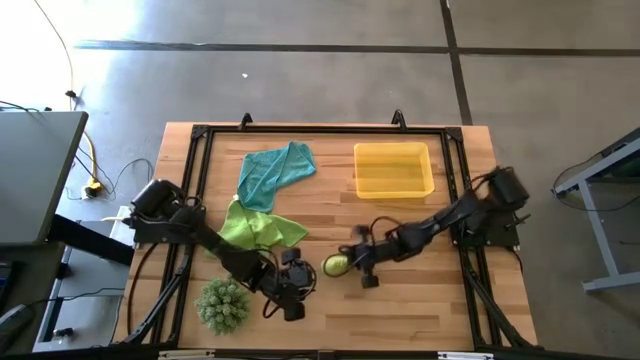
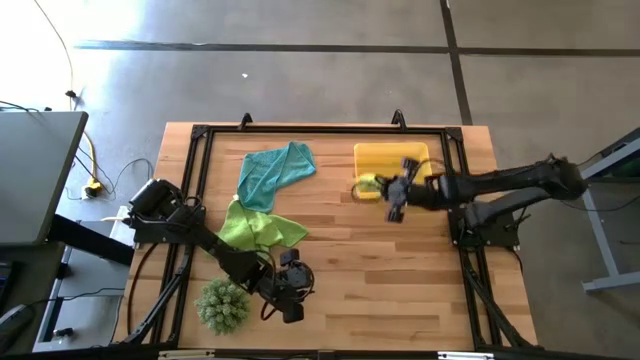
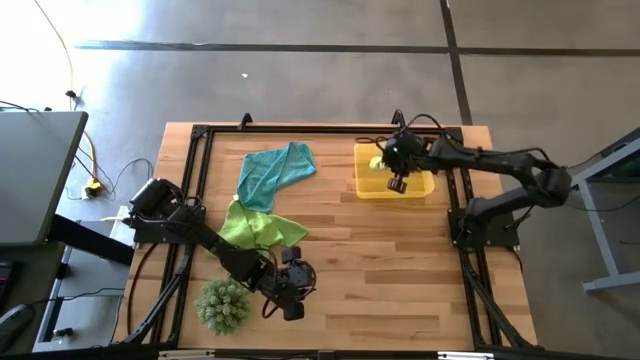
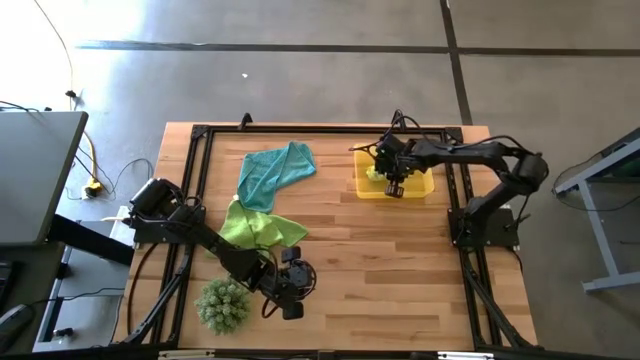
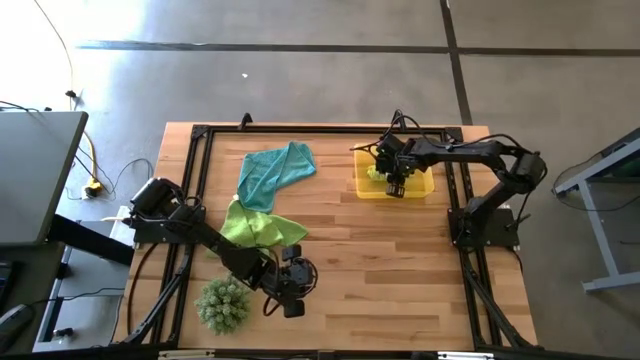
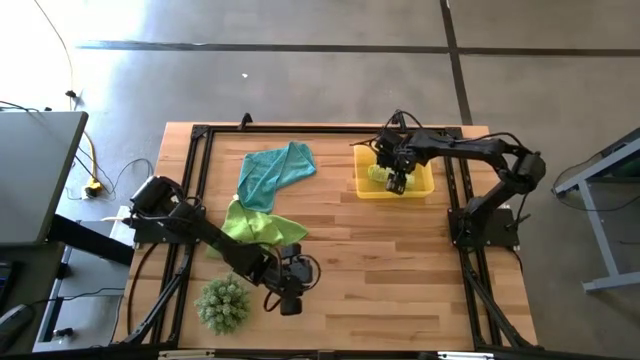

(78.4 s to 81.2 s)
Task: Roll microfiber towels into tight, uniform cylinder then place into a basket
Put the light green towel into the bin

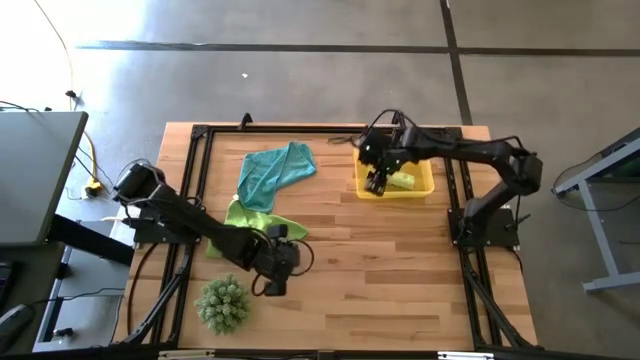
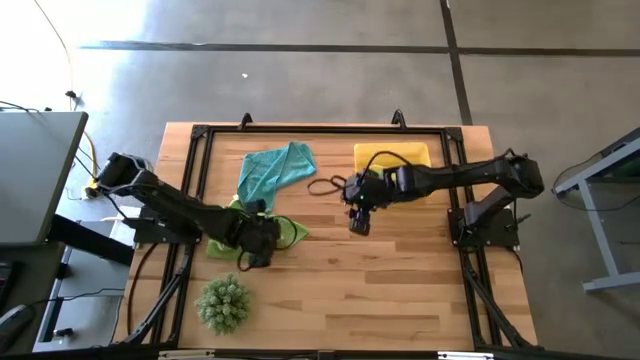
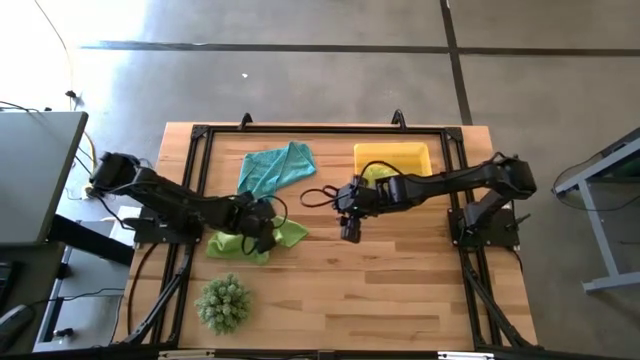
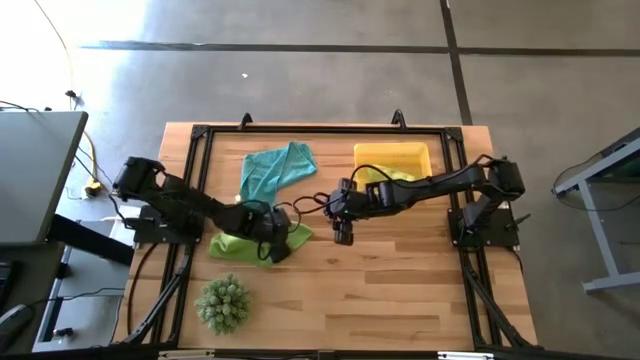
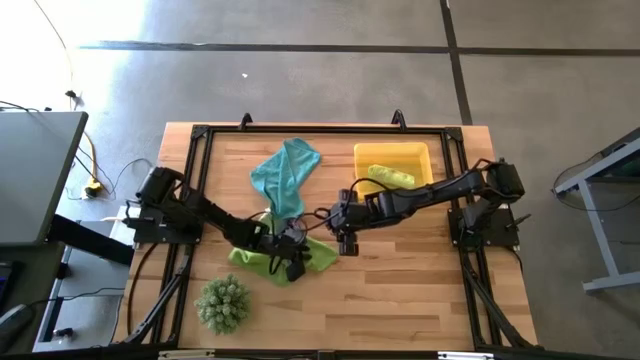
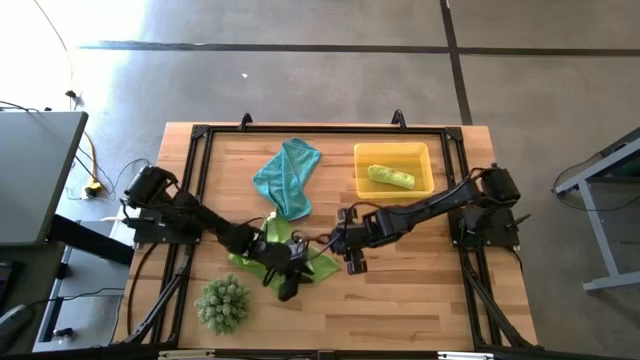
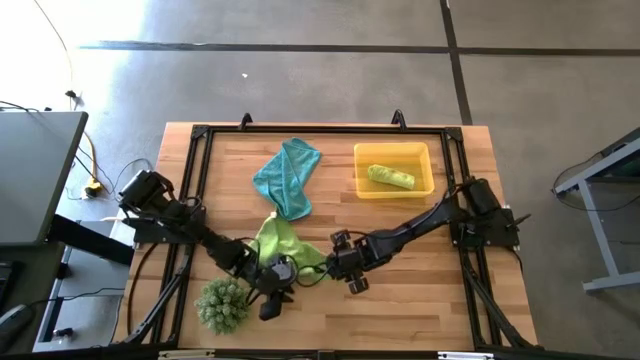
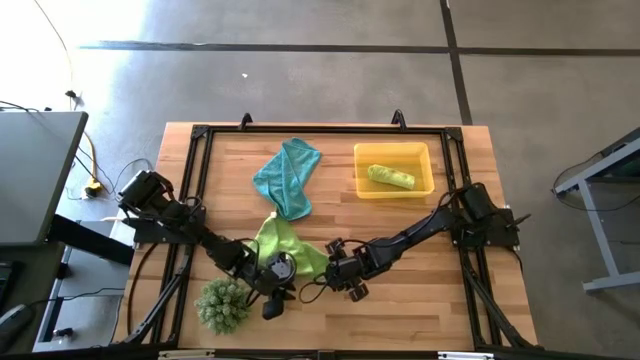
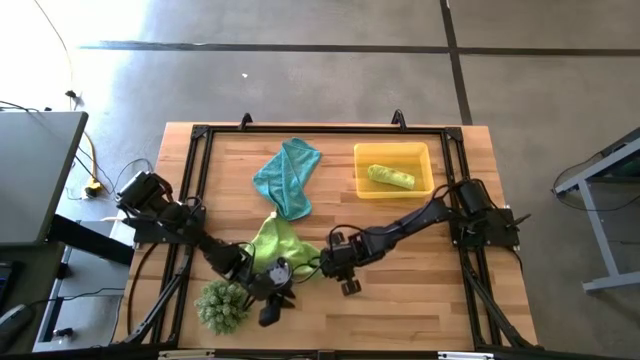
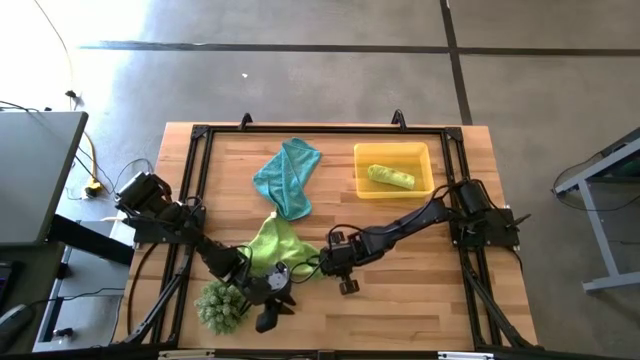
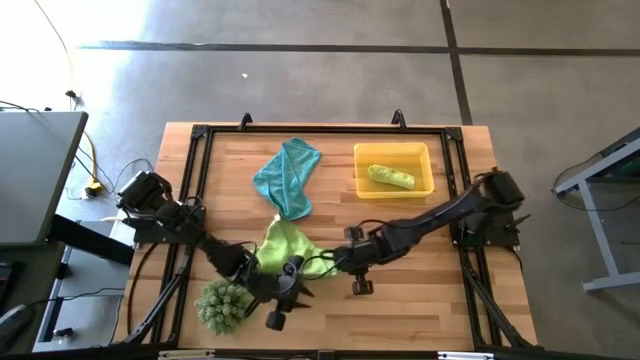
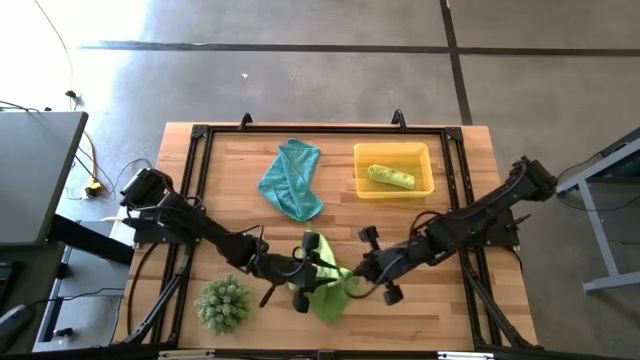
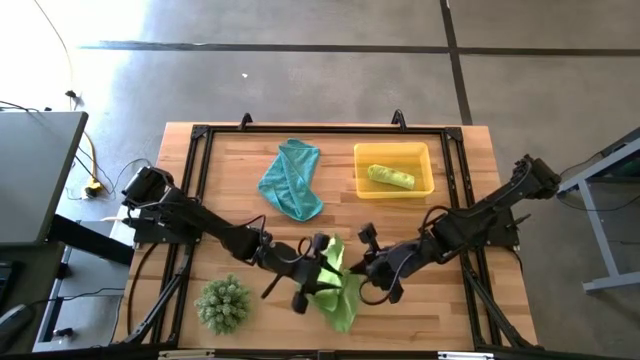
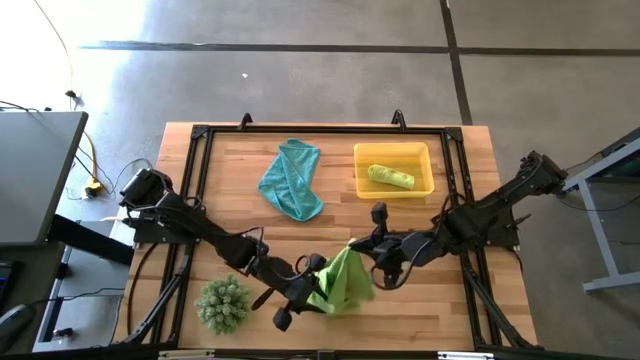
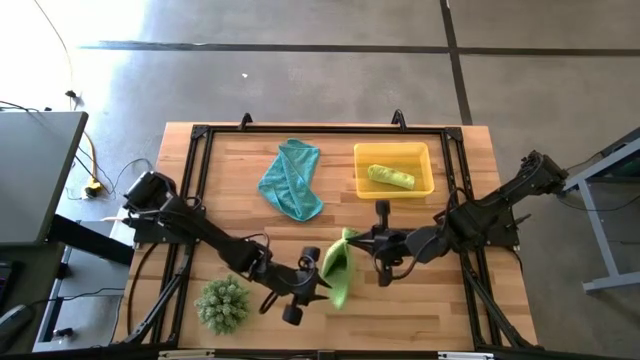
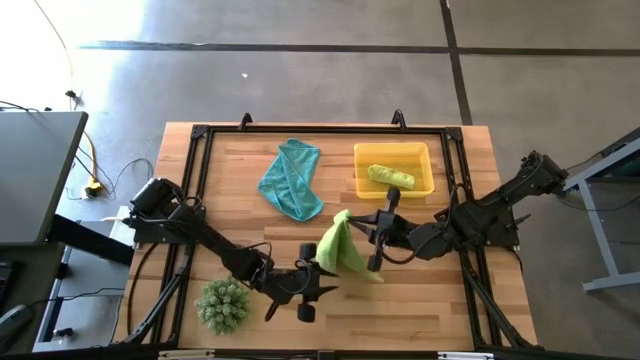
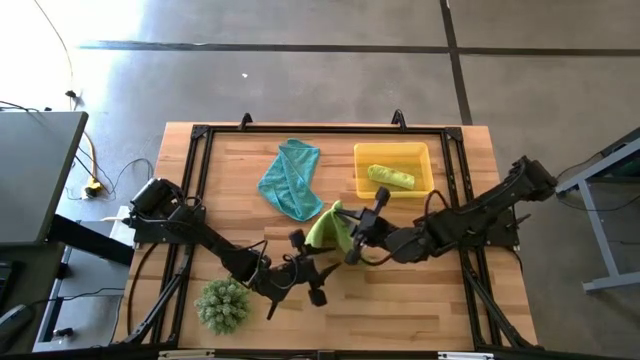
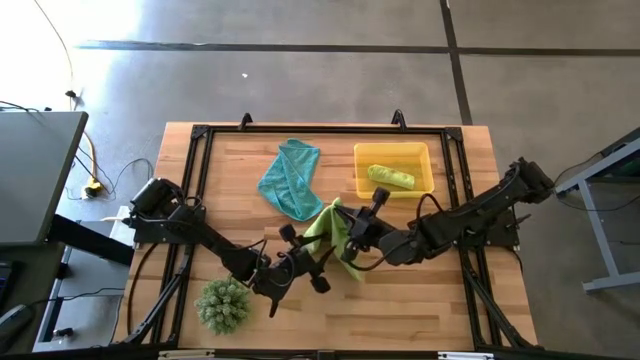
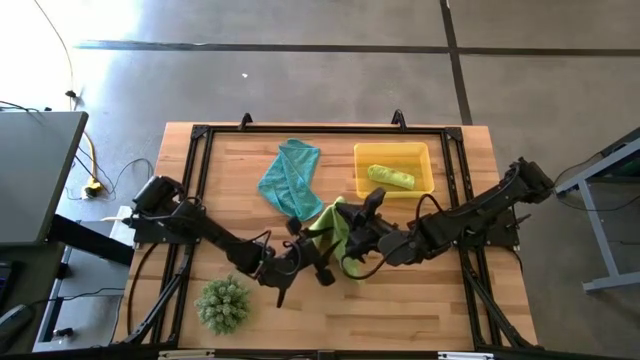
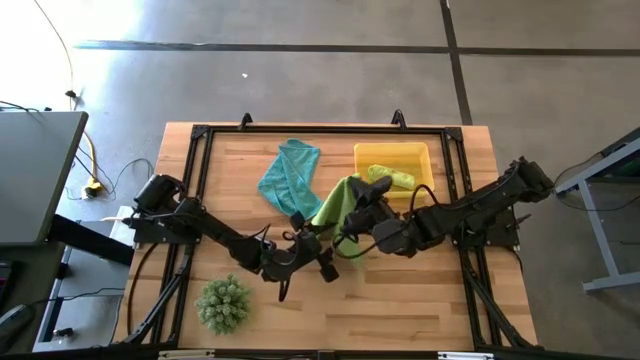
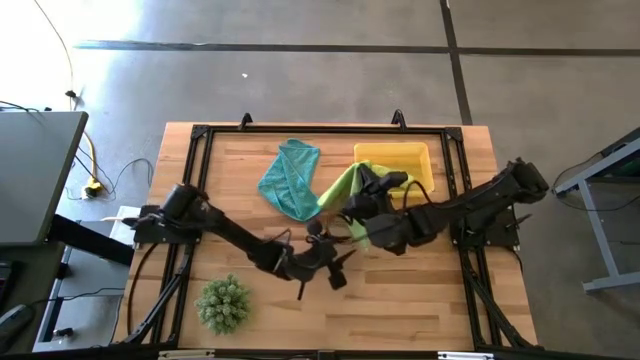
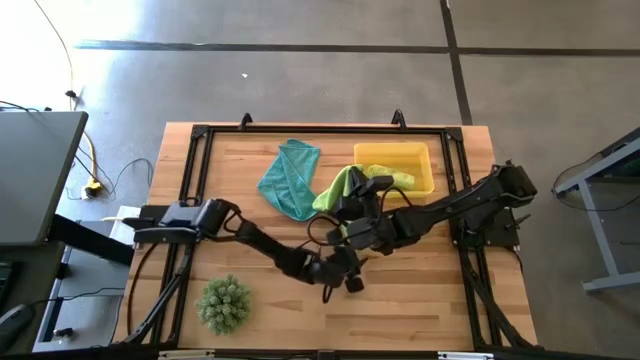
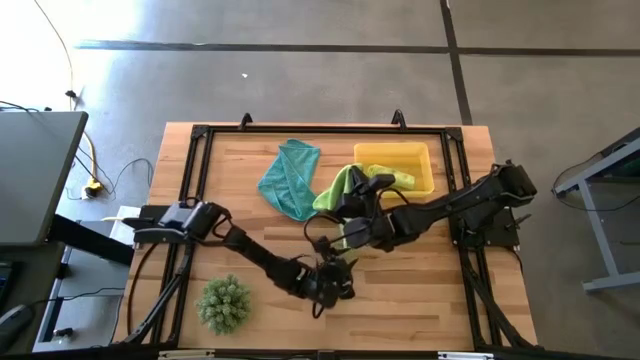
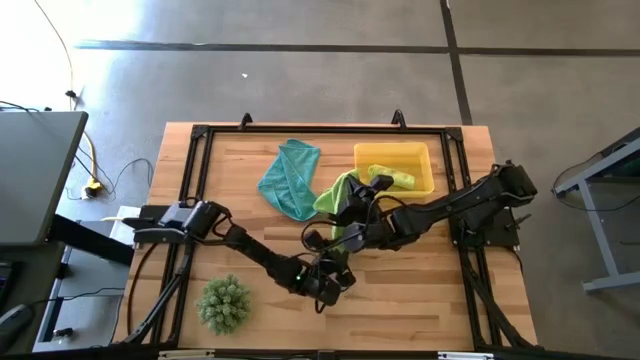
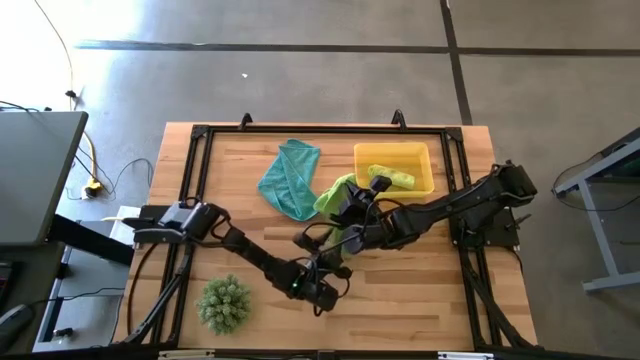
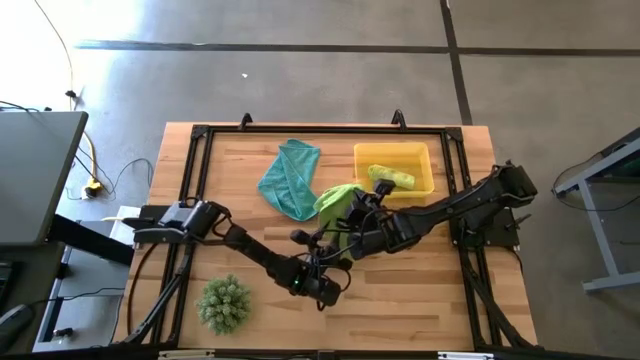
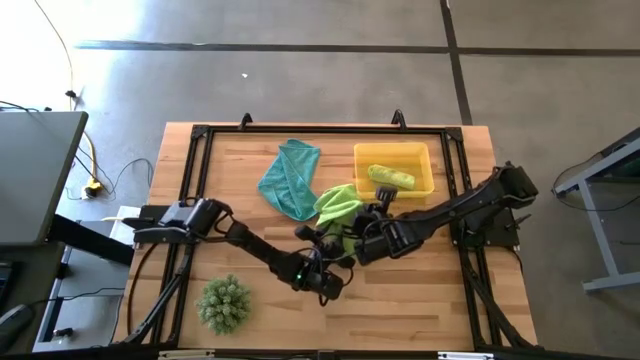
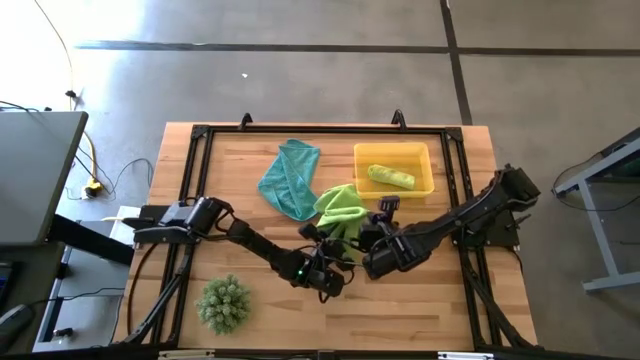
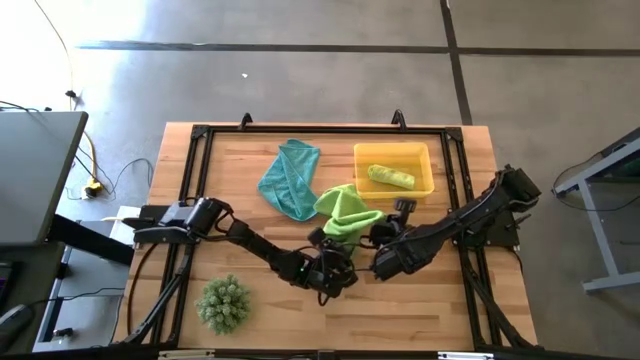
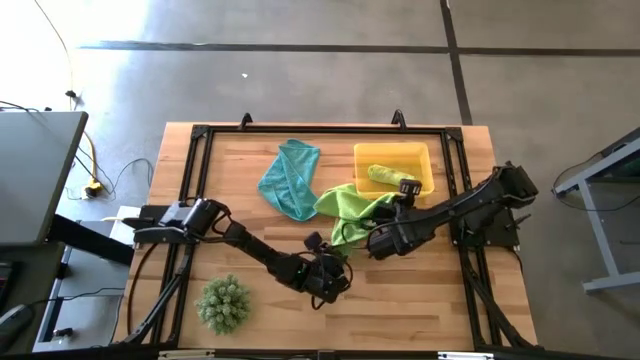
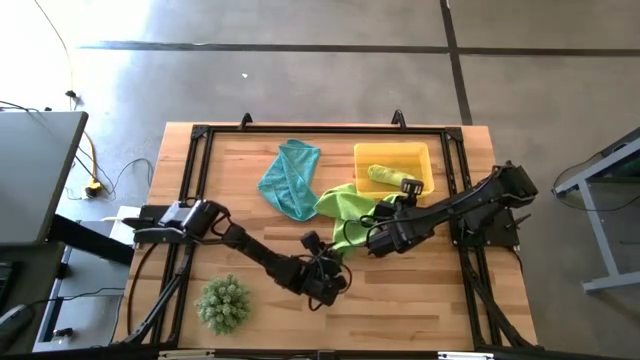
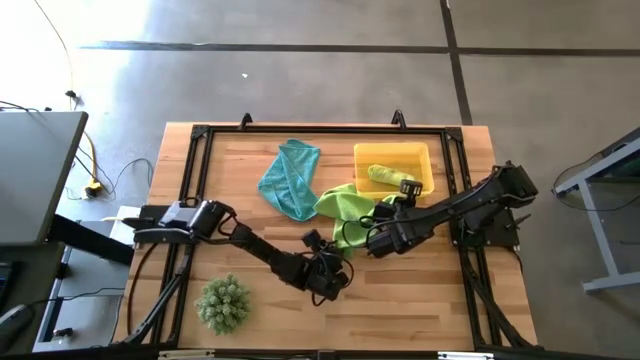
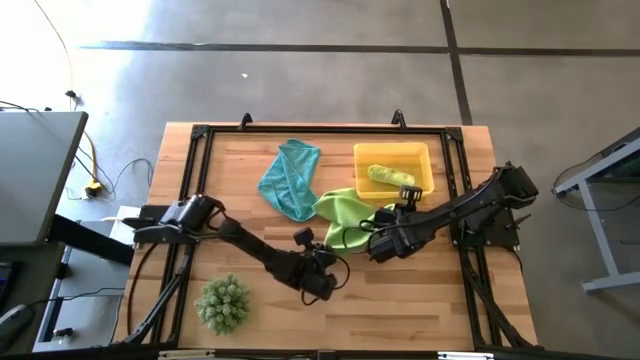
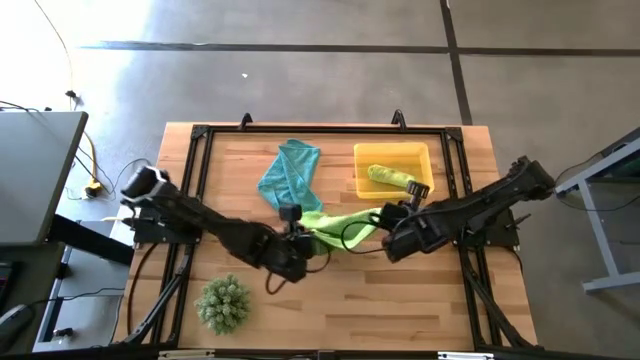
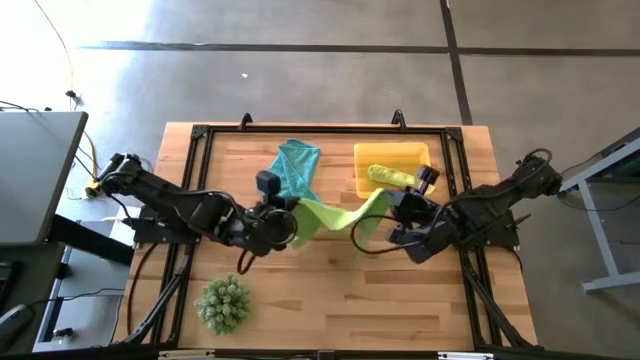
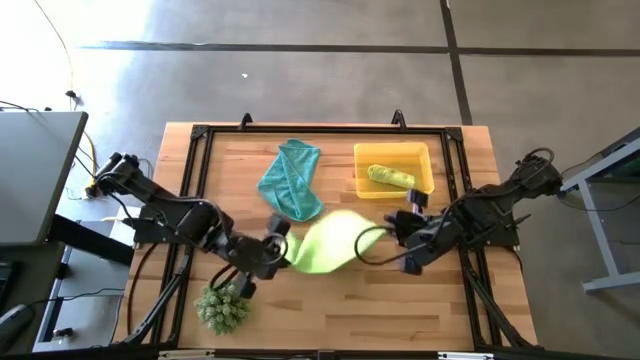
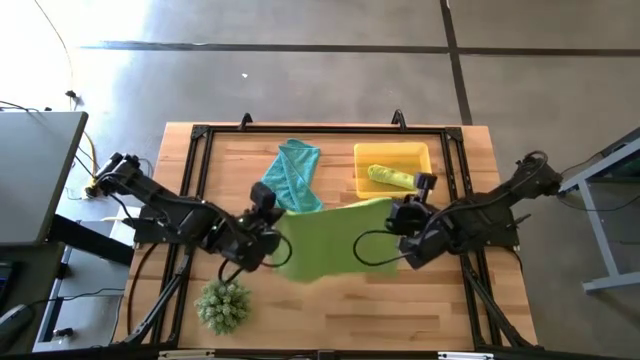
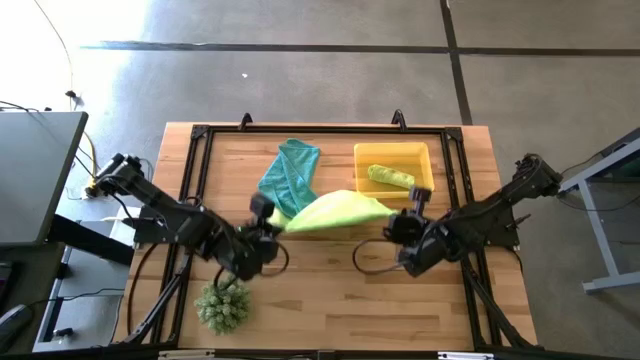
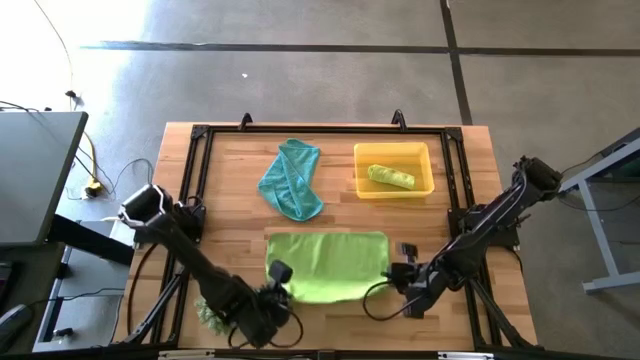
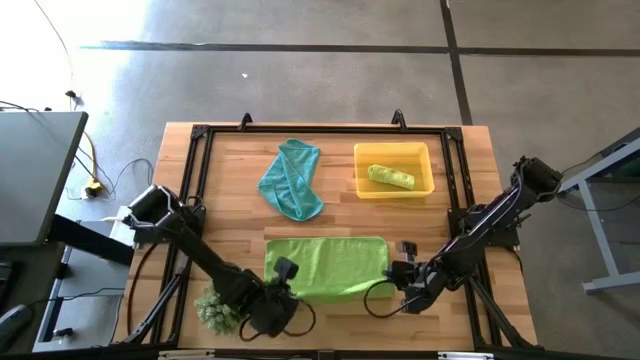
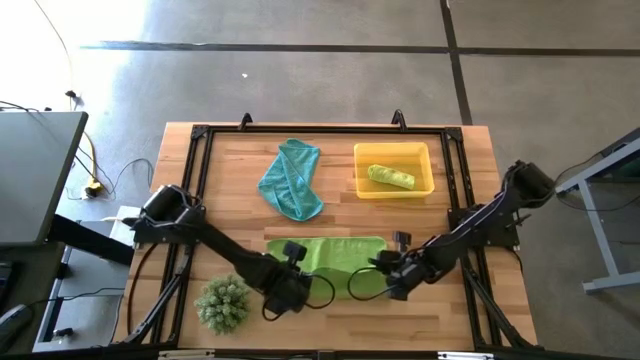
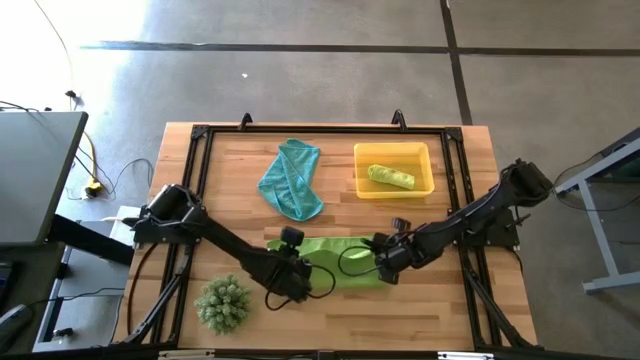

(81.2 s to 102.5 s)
Roll the green towel
